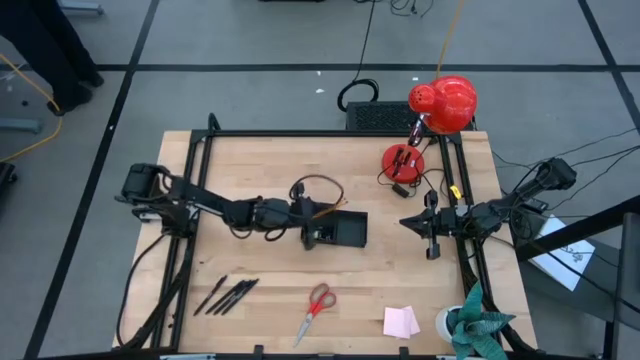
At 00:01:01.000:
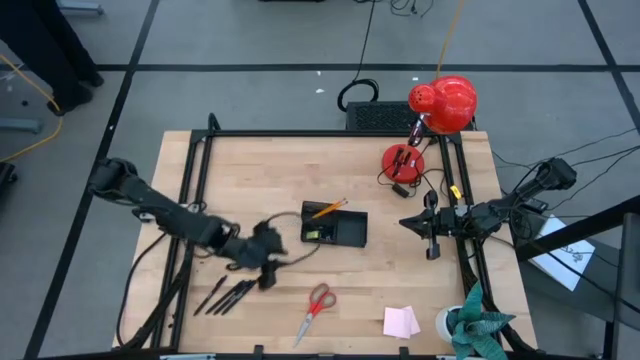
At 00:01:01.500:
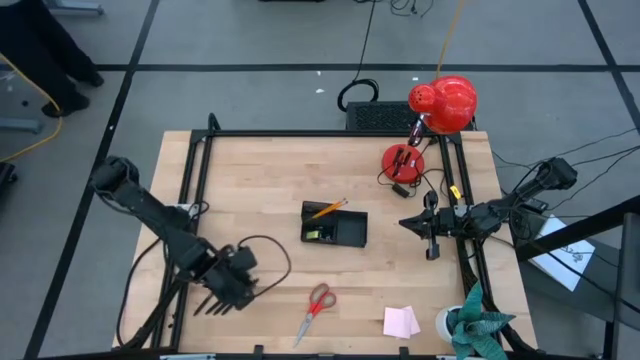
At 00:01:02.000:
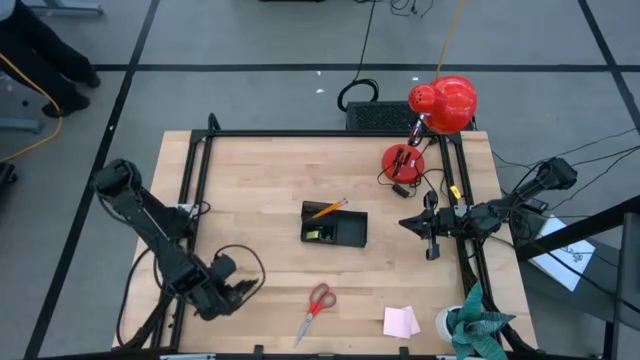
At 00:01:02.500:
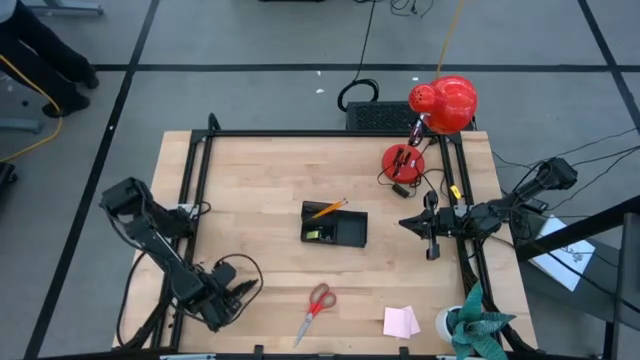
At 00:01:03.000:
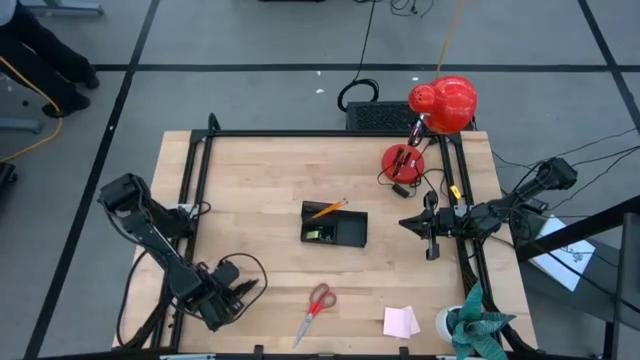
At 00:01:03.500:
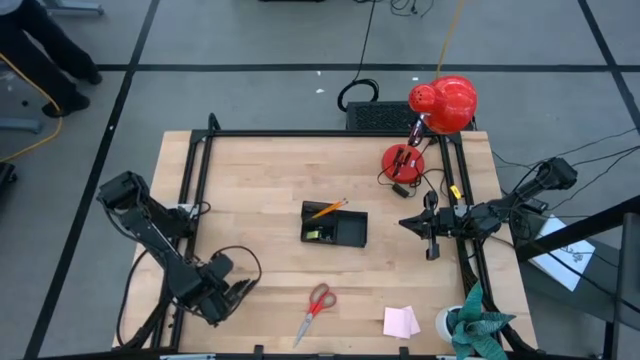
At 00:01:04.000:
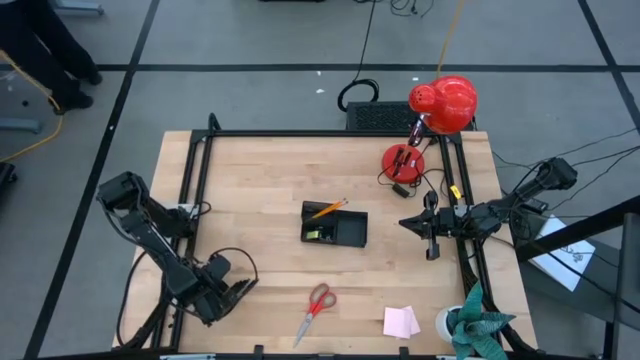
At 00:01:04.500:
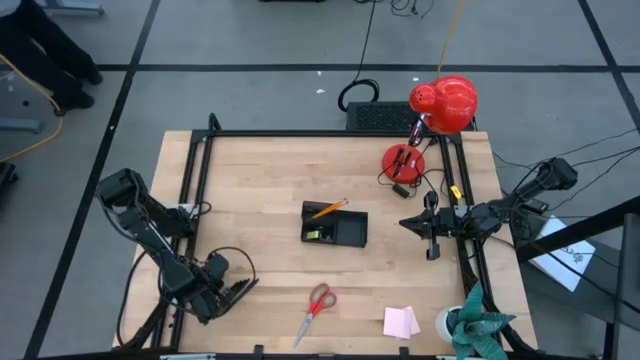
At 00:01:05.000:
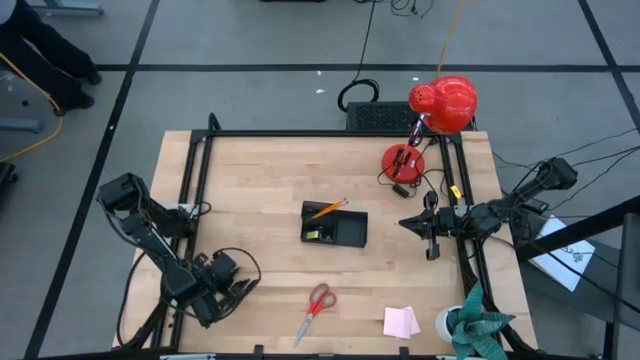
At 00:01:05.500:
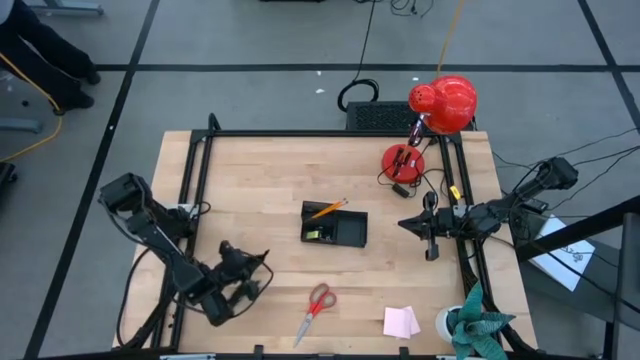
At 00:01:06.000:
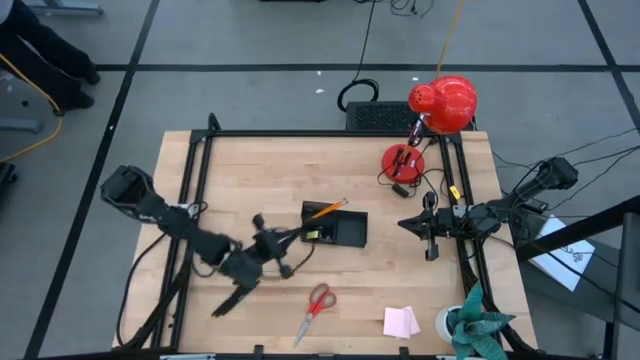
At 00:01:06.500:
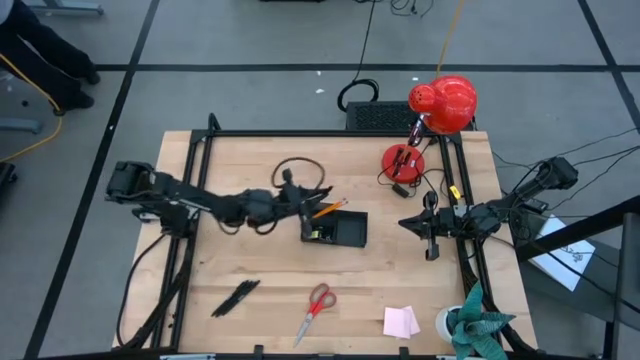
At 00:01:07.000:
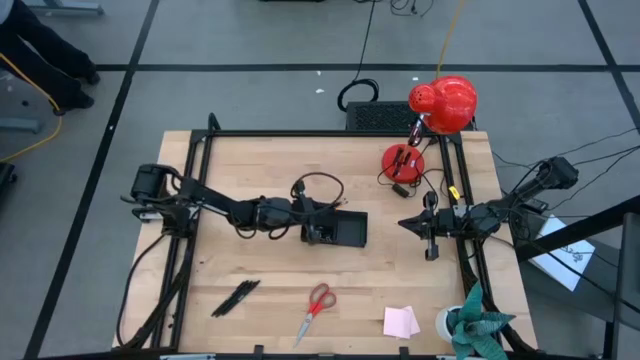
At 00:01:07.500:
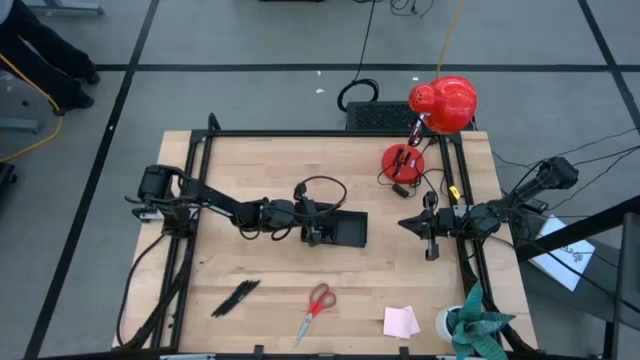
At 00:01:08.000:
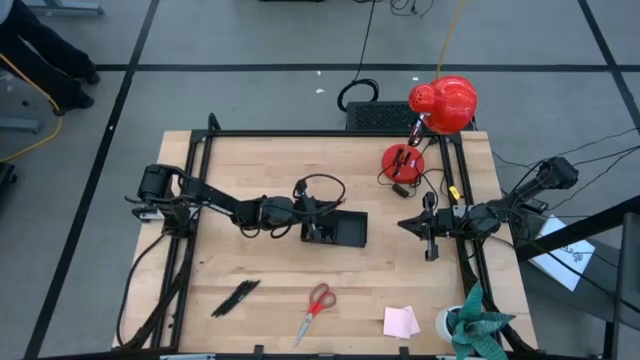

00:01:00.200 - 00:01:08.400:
Task: Pick and place office supplies into organizer
Put the pen into the desk organizer

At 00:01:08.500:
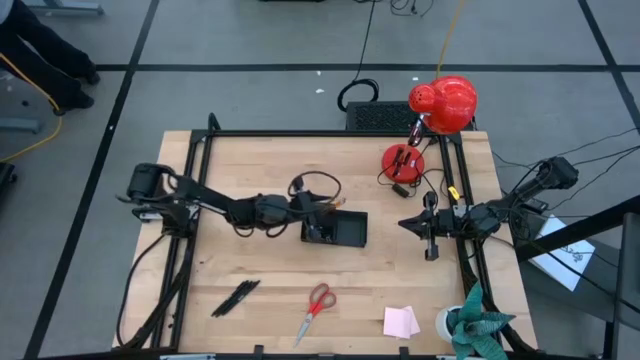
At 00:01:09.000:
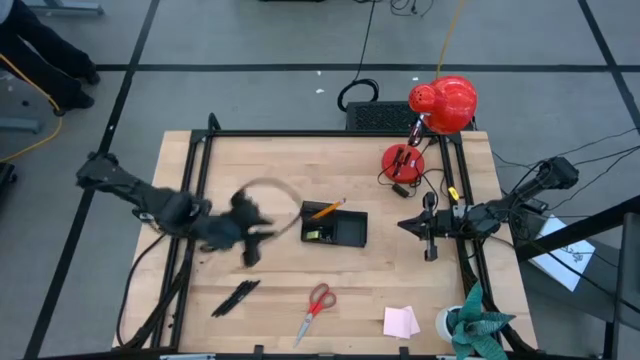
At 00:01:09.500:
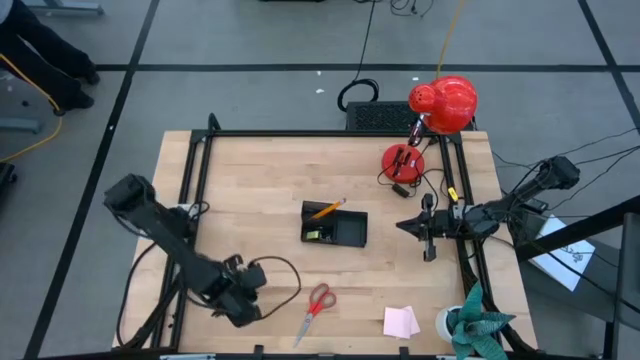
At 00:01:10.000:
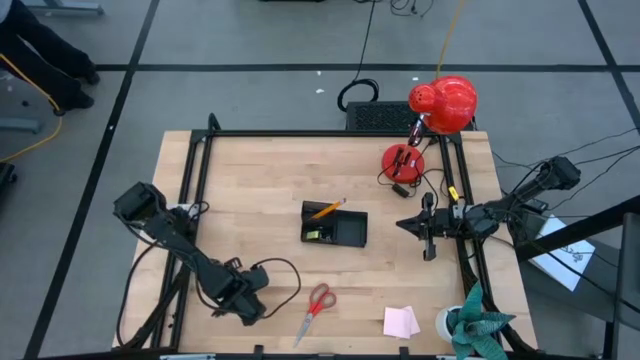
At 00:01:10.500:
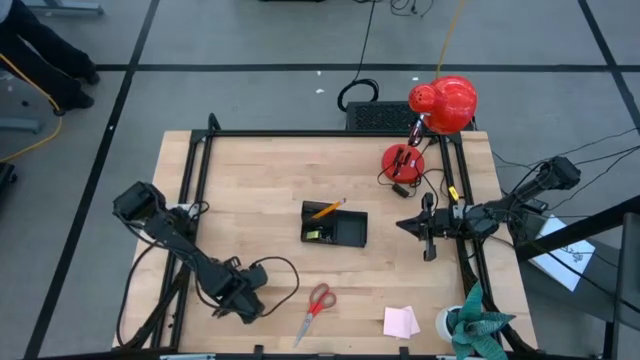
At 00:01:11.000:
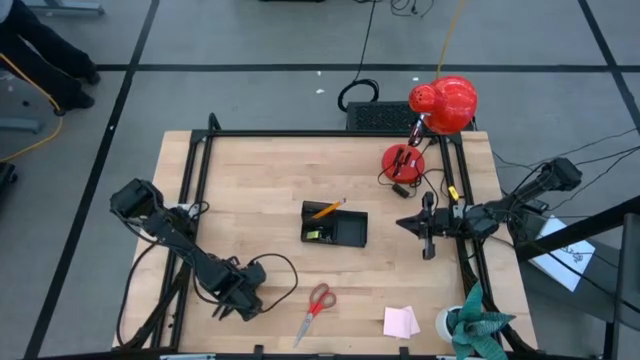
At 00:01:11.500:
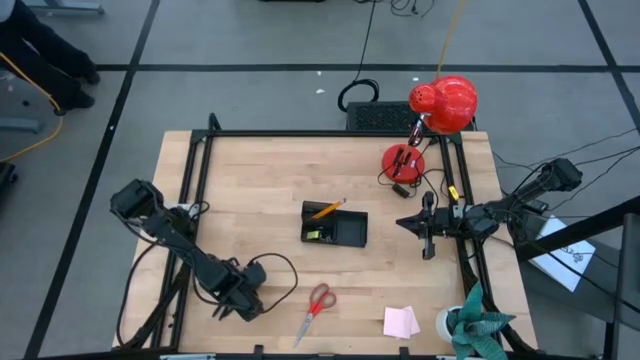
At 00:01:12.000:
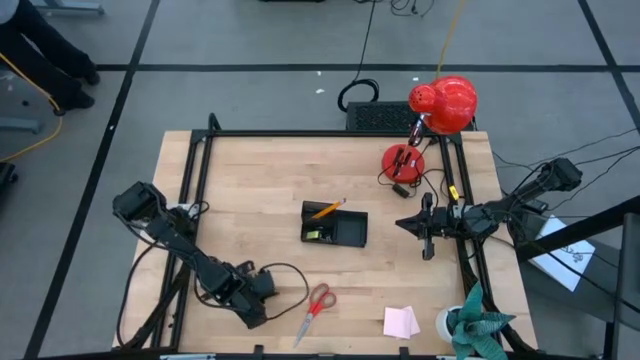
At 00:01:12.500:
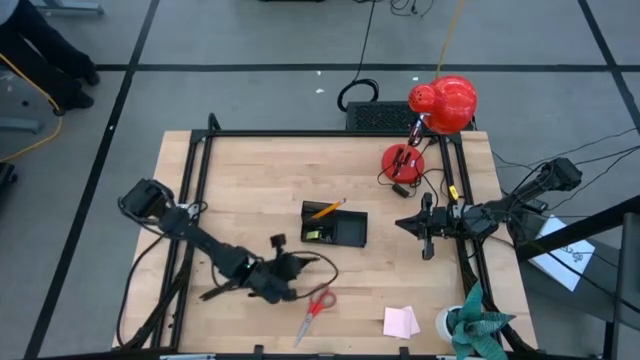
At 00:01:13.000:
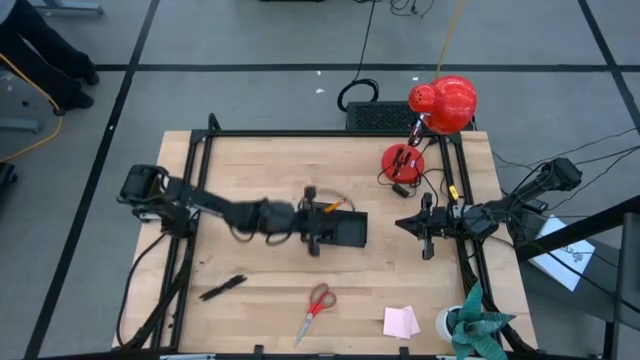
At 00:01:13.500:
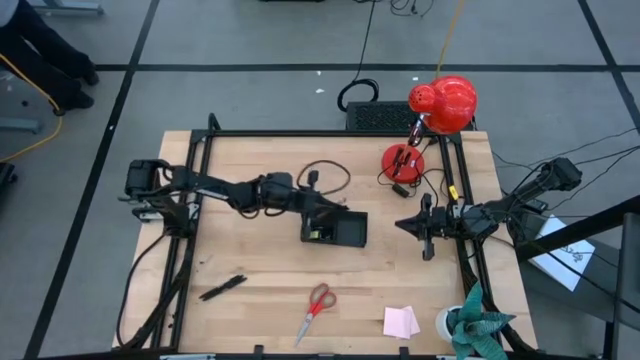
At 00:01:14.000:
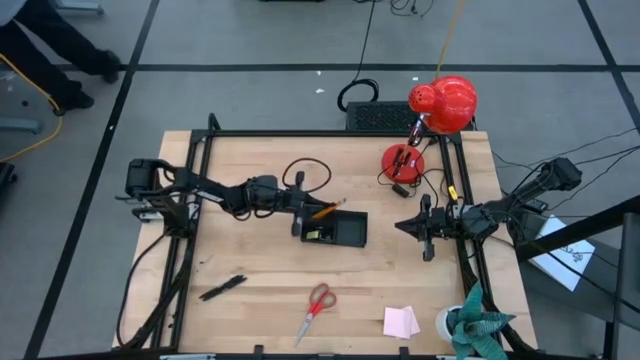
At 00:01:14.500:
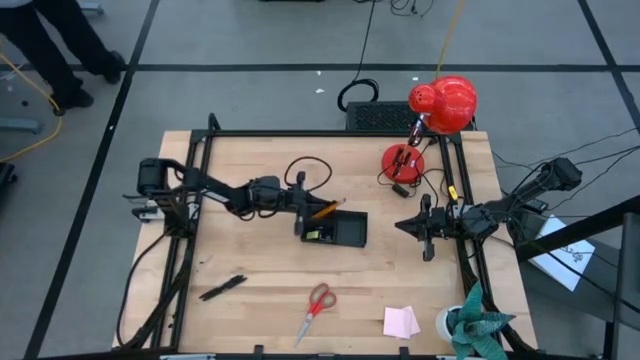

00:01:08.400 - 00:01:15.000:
Put the right pen into the desk organizer

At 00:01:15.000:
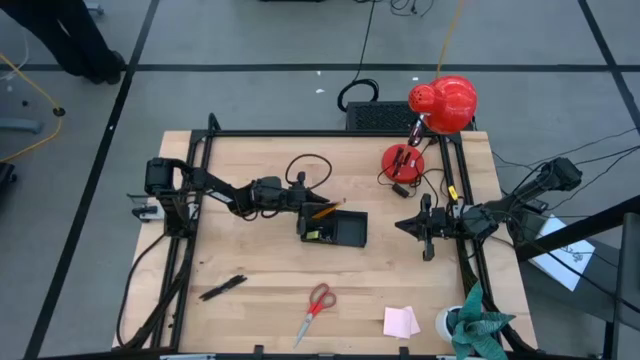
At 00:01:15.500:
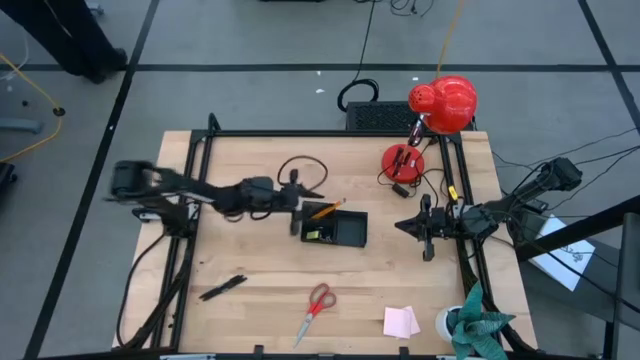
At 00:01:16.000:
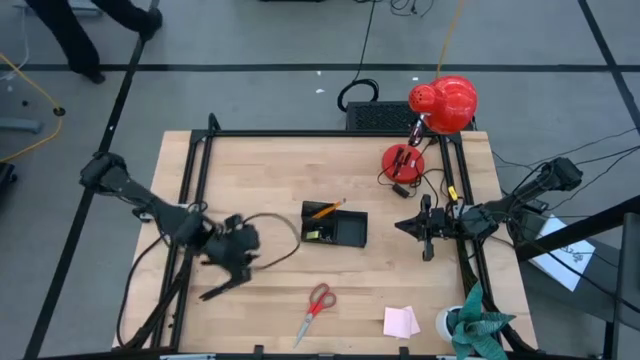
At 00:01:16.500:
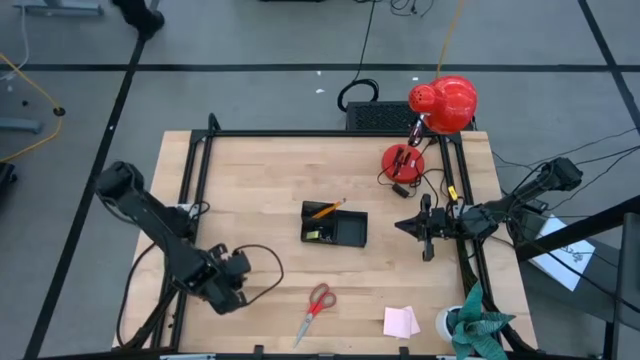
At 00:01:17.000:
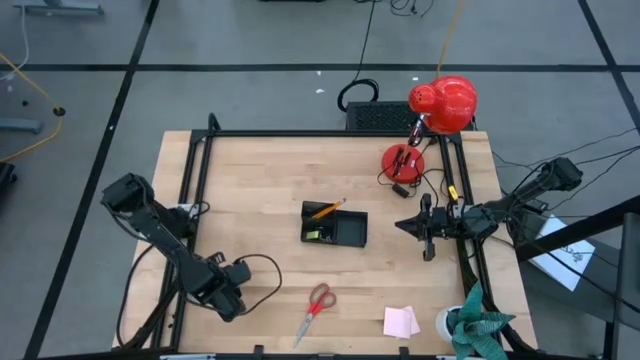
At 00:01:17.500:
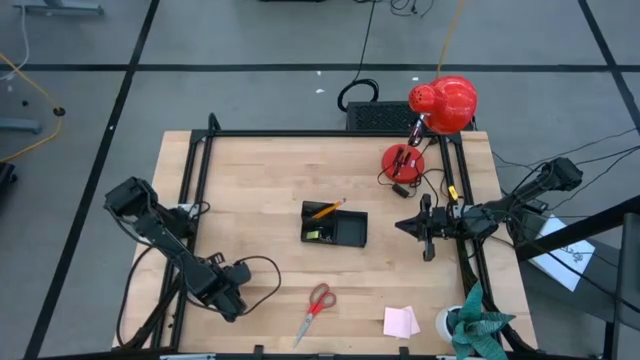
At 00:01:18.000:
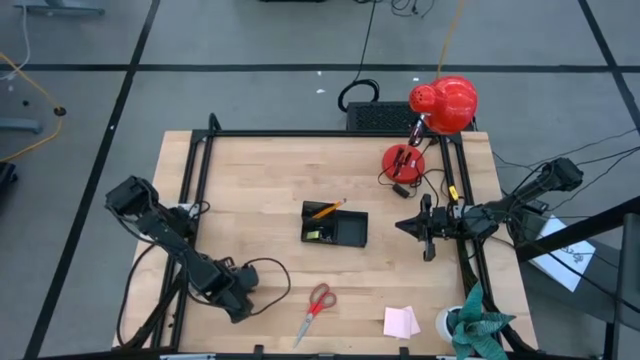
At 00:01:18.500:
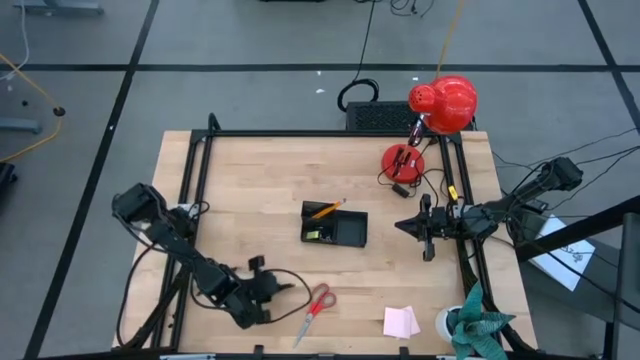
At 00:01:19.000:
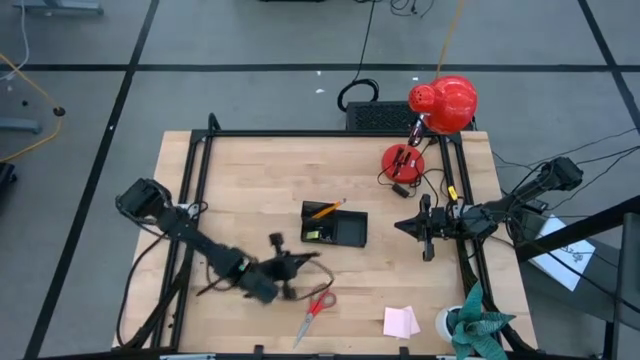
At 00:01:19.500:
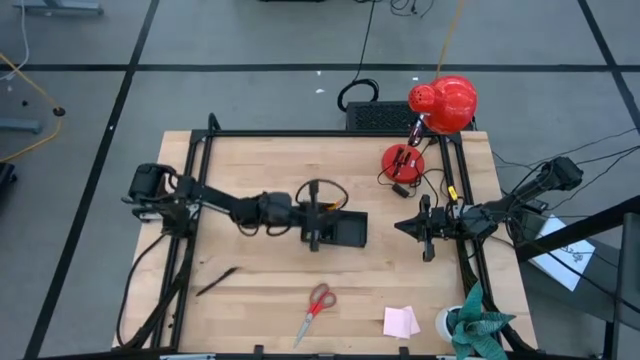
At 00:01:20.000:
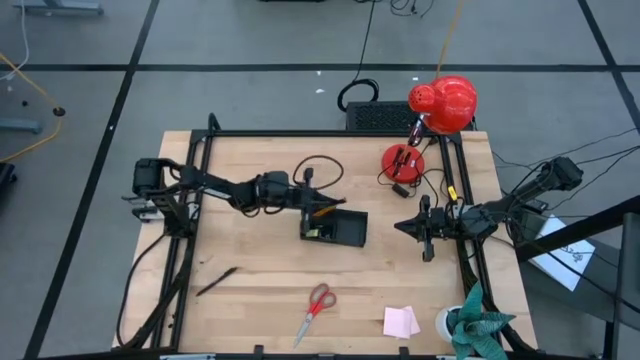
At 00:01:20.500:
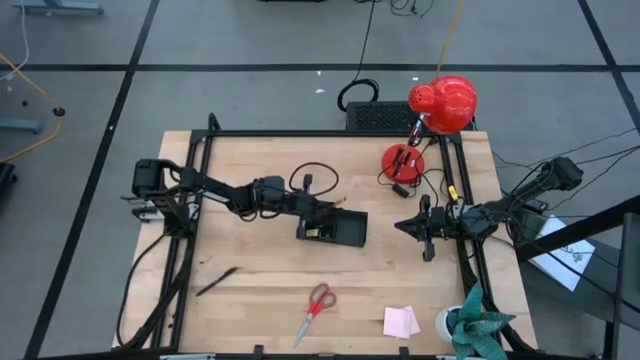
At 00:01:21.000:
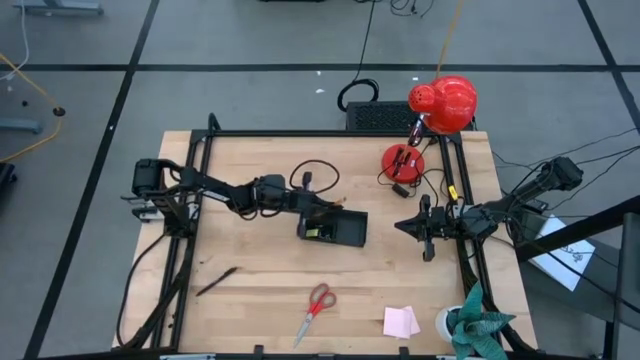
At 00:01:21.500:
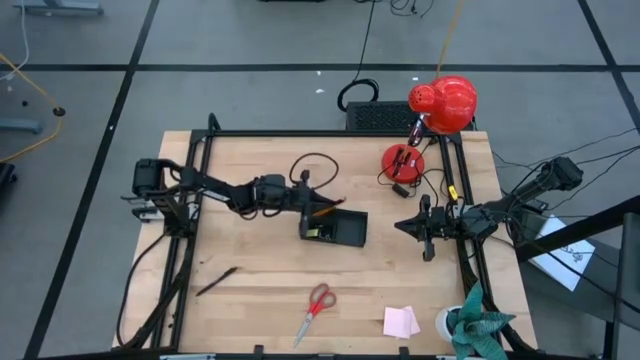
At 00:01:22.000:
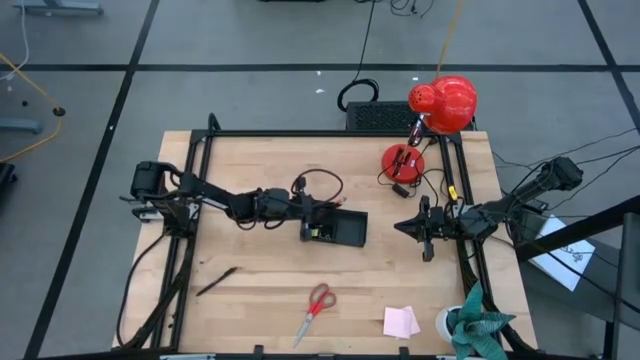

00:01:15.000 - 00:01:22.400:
Put the right pen into the desk organizer
